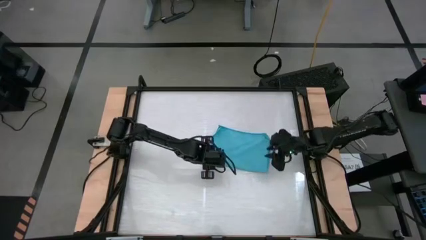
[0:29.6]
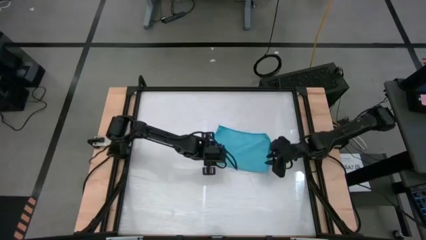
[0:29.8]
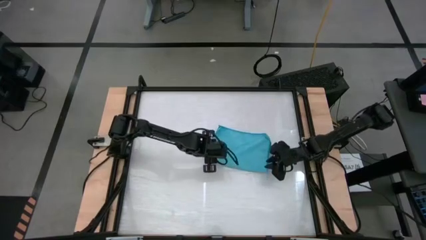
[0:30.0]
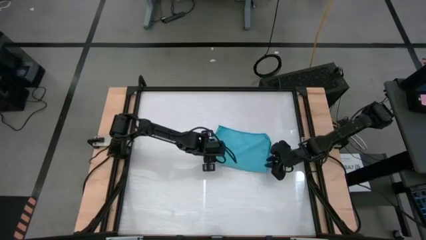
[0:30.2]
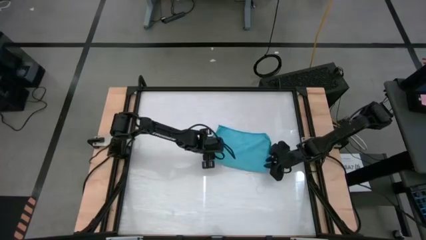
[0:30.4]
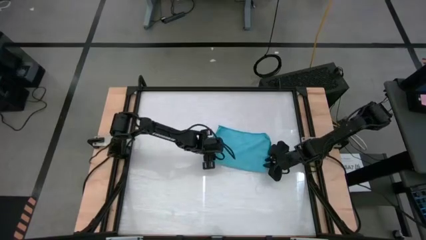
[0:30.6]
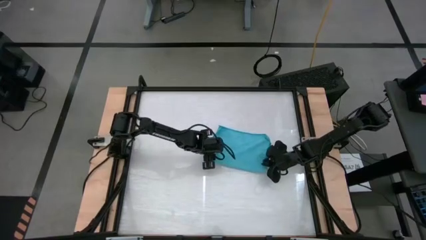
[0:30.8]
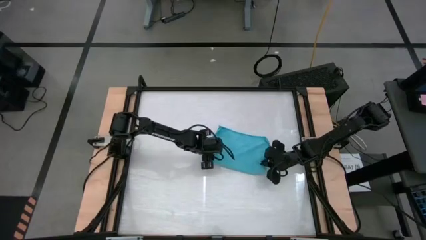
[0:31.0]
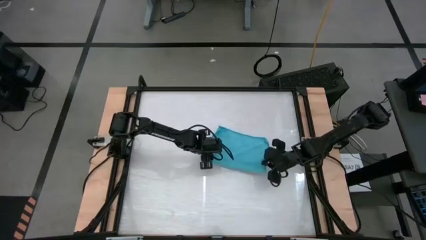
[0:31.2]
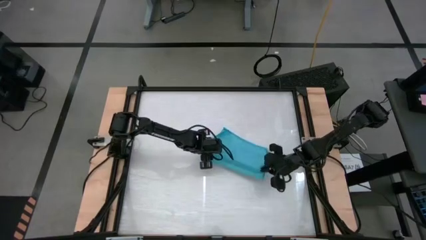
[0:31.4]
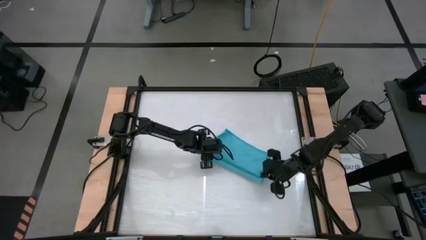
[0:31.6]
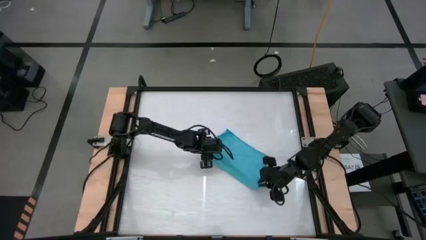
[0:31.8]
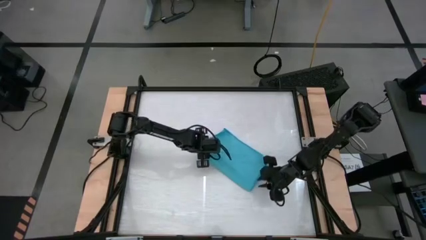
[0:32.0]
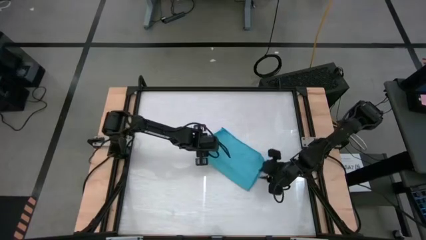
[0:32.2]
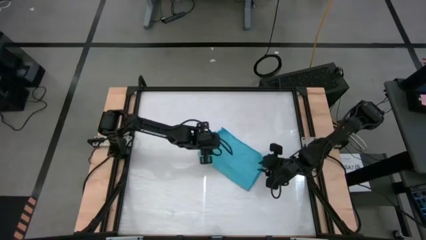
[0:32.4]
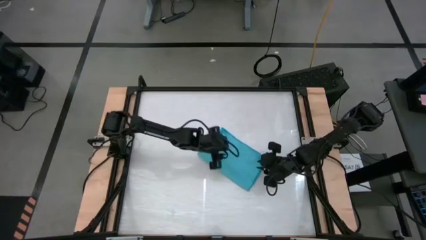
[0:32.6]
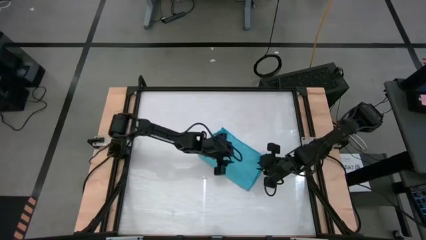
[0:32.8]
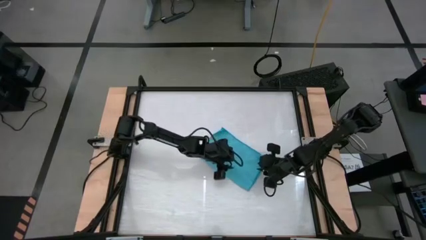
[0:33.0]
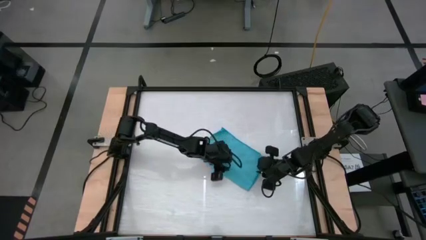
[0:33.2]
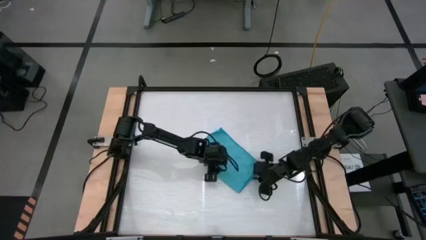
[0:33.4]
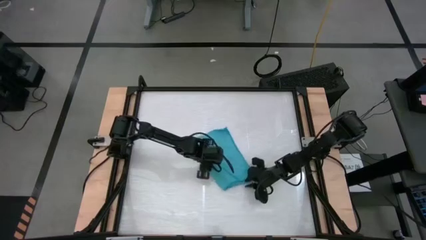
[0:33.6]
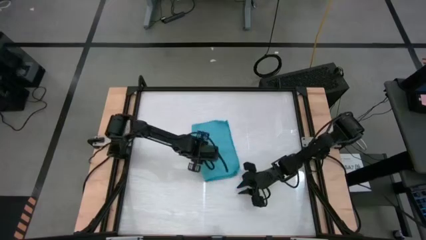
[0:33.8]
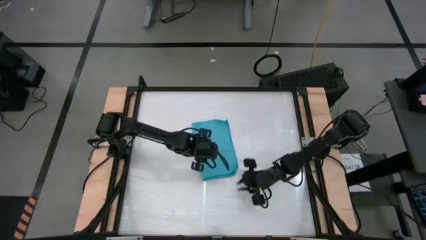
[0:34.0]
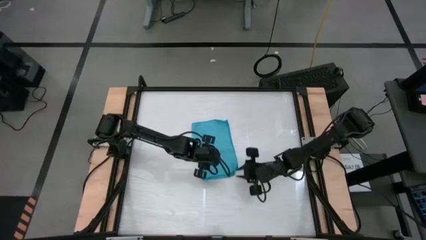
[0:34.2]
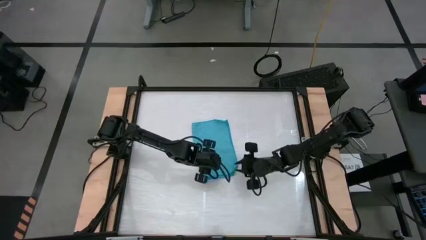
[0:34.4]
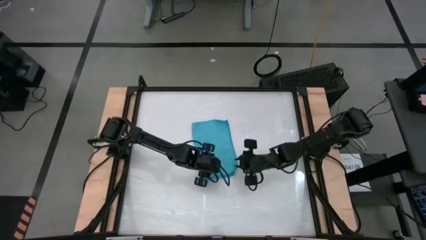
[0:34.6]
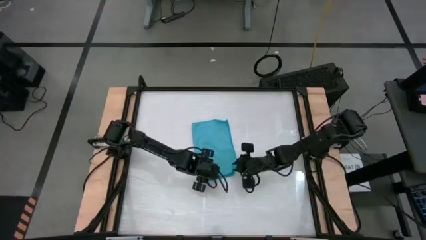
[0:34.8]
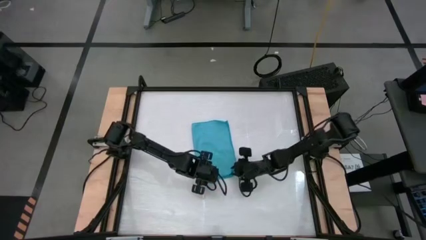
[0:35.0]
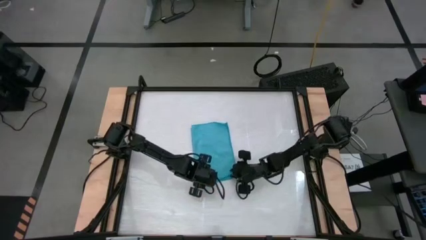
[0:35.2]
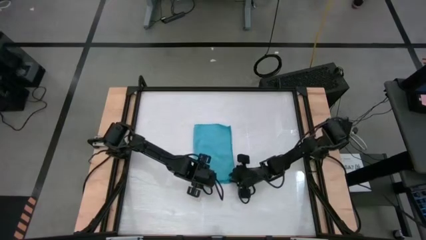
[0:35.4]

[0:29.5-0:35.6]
Task: Roll towel
Adjust the light blue towel

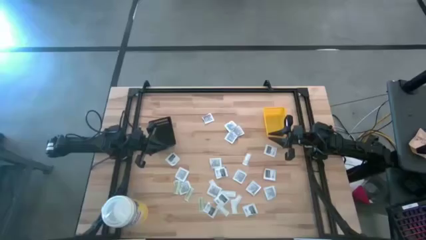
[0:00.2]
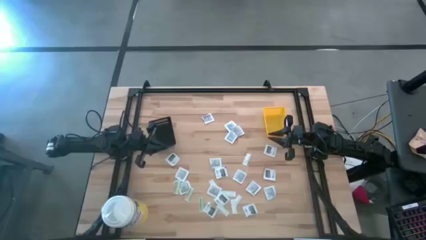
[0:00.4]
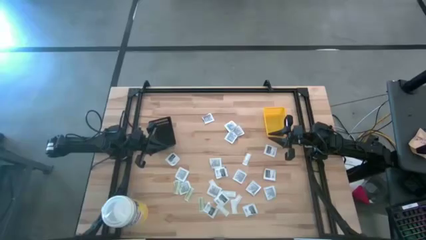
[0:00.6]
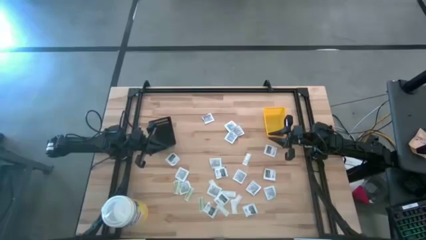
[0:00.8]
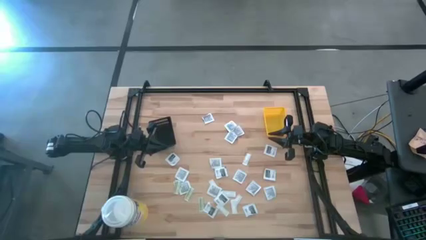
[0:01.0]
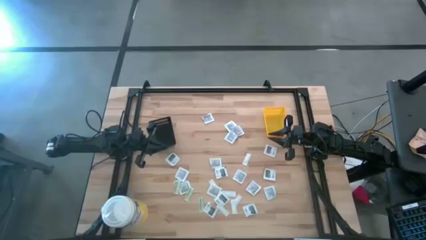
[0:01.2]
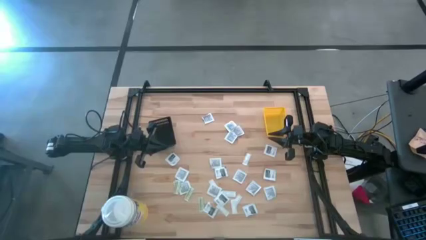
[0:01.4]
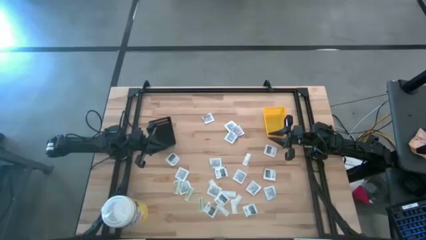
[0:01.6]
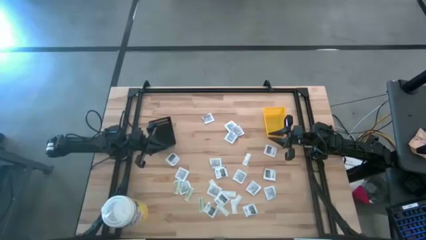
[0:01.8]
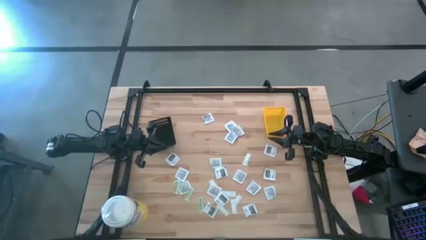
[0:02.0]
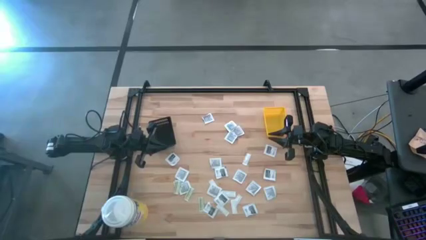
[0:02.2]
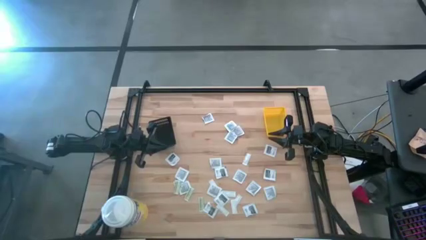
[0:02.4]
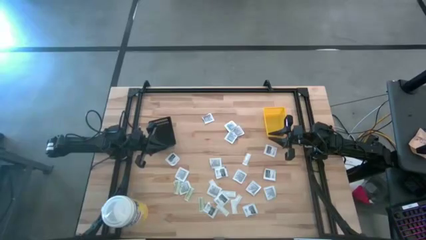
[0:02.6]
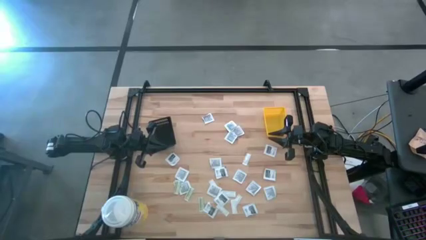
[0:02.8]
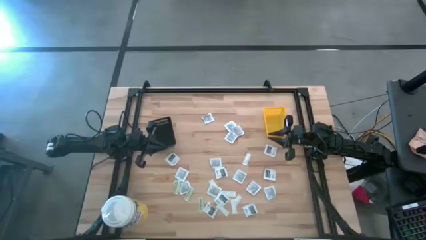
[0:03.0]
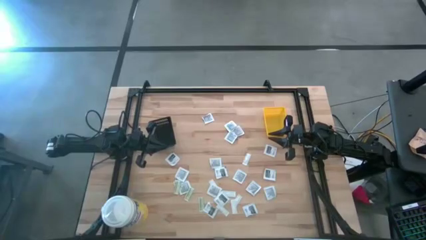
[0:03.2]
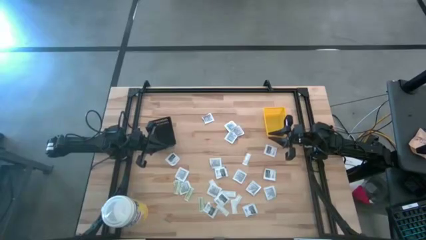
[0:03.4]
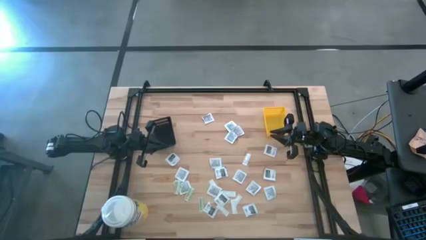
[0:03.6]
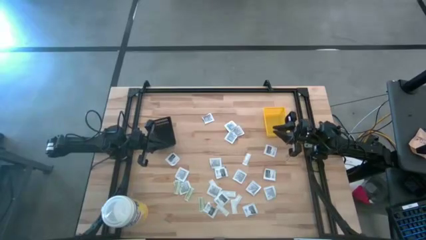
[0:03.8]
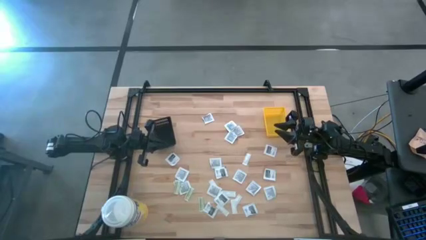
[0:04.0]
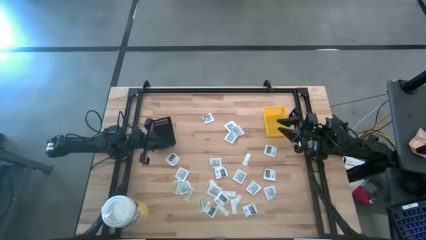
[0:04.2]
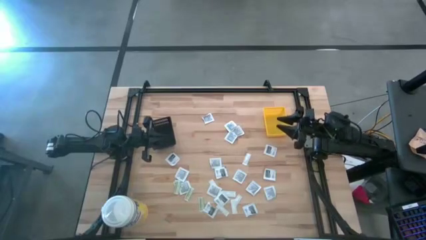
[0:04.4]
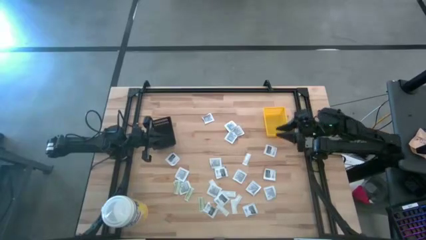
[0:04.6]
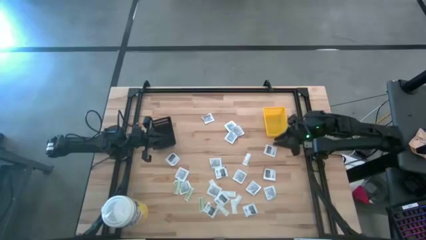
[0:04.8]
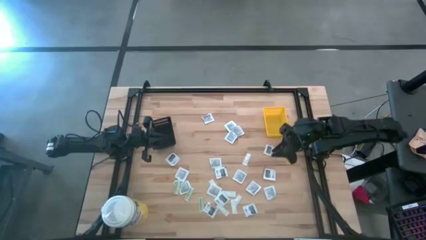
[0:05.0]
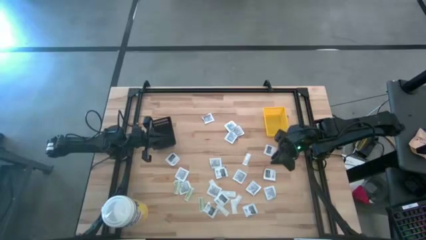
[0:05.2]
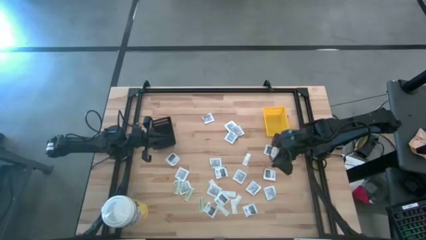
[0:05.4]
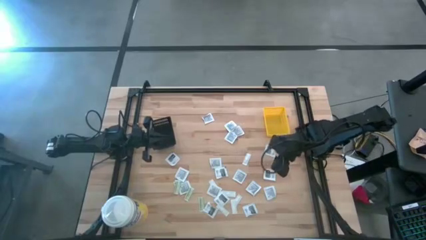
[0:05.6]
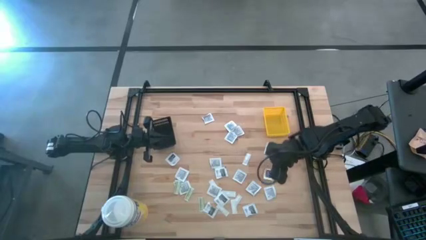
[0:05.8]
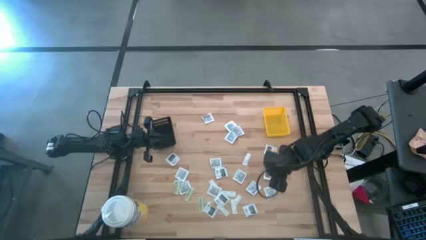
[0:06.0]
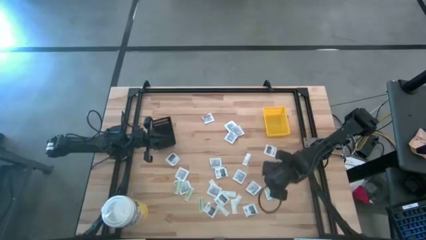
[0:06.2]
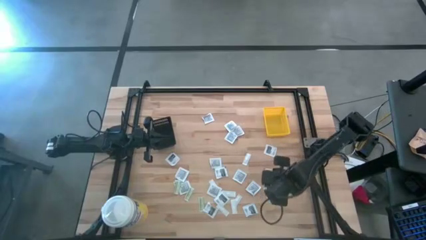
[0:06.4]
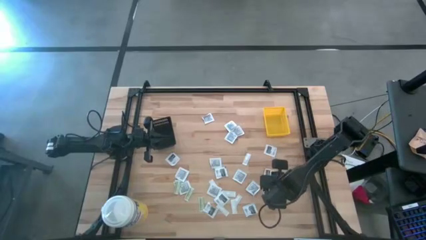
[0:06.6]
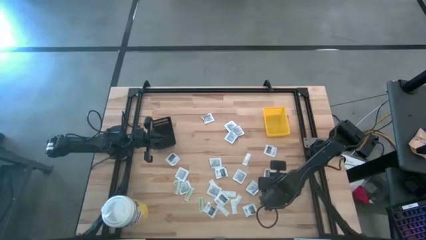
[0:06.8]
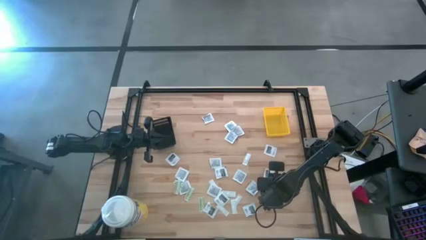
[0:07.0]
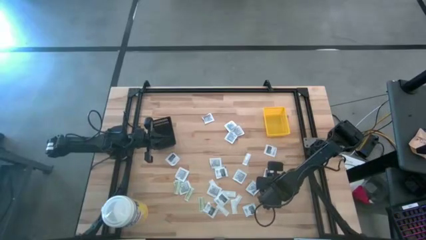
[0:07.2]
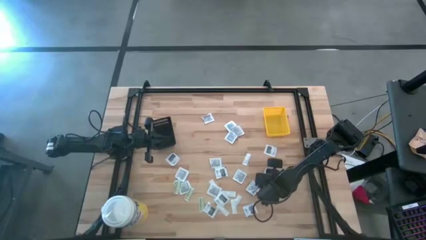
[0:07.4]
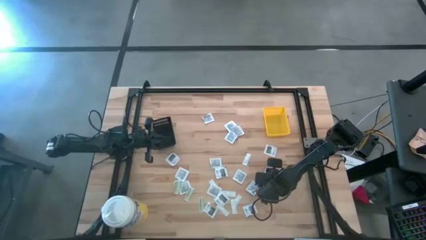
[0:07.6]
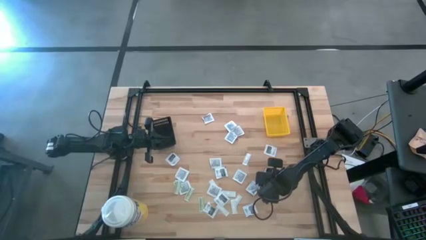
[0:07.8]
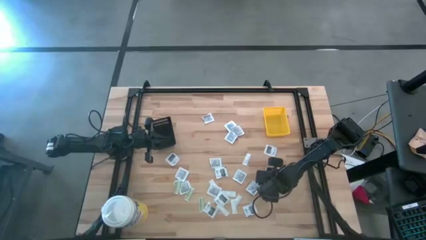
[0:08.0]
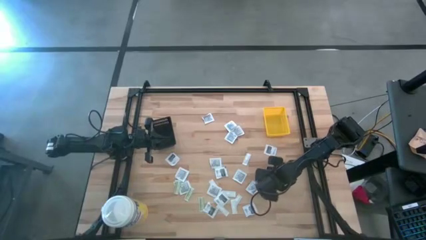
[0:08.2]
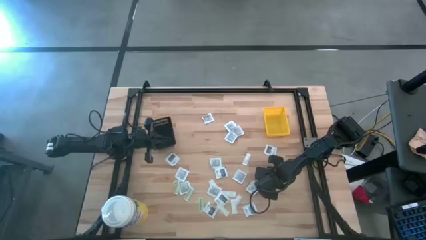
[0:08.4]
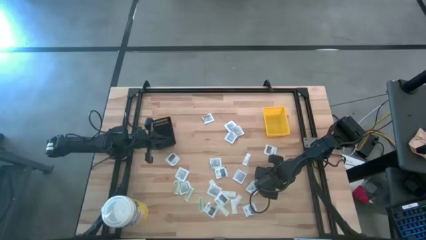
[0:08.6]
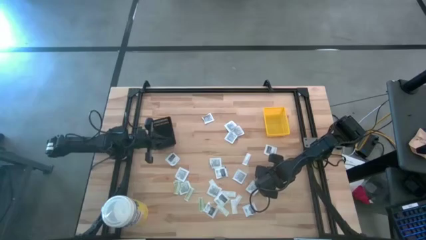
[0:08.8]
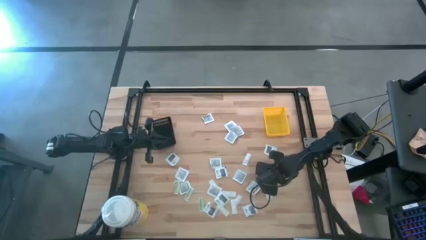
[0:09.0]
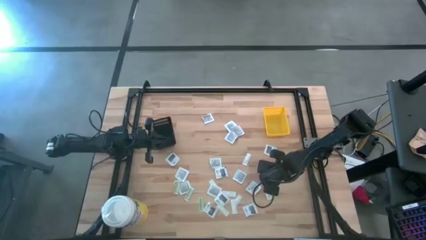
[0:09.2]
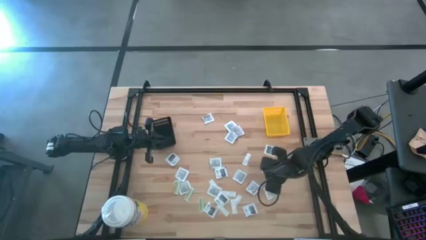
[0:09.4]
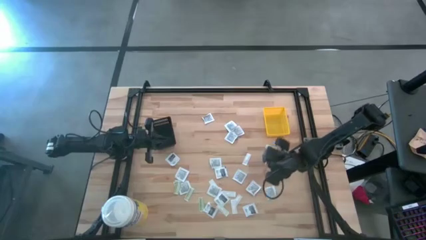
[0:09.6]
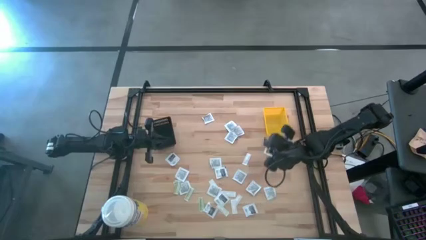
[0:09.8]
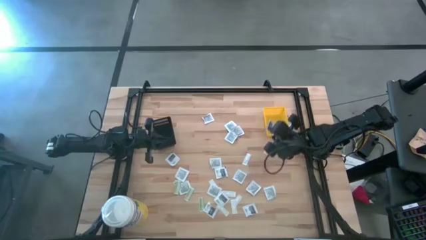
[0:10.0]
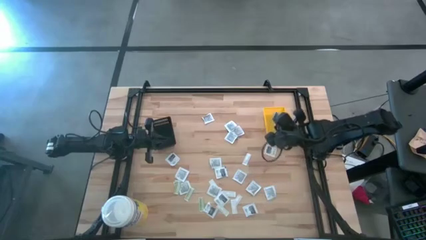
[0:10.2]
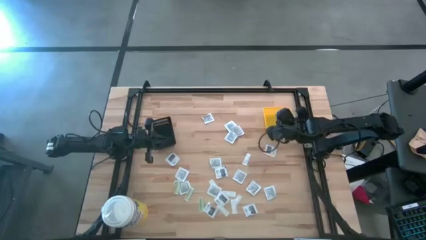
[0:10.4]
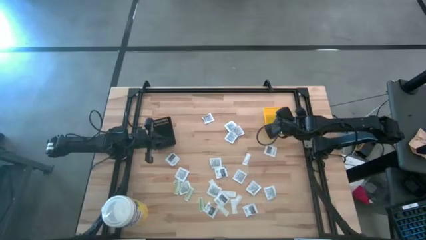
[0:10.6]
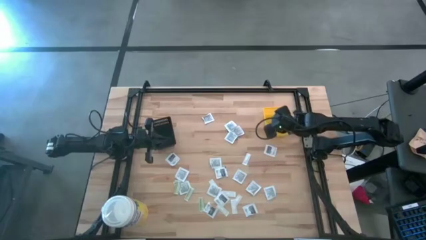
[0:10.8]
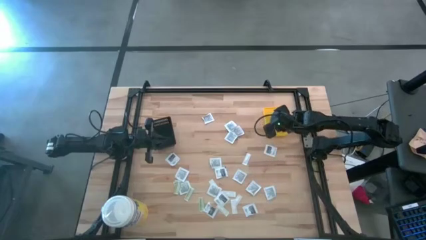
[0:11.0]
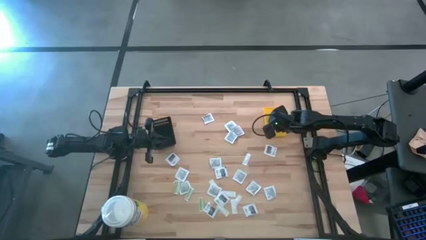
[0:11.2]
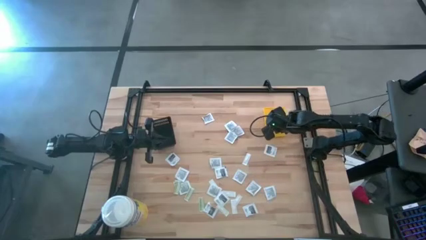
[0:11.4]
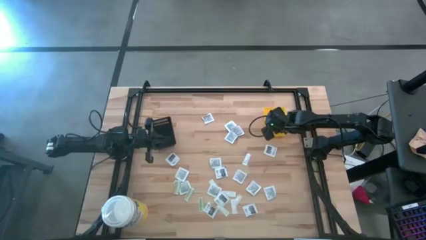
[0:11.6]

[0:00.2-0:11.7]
Task: Pick & Place First Aid Supplies
Put the black pad into the yellow bin
